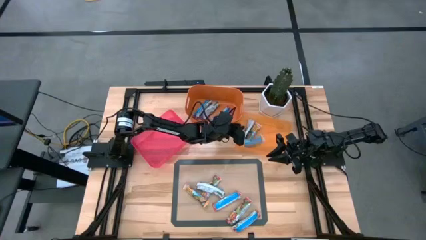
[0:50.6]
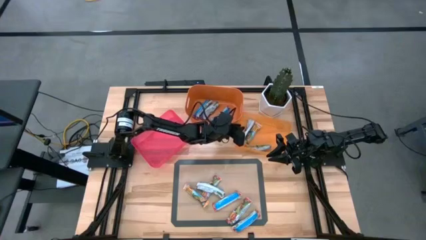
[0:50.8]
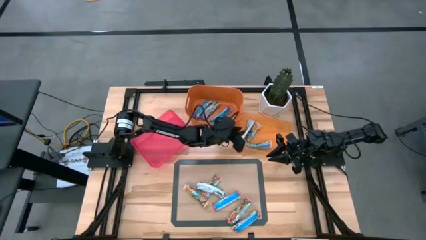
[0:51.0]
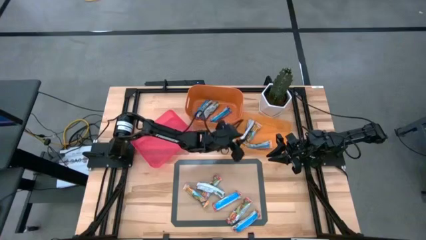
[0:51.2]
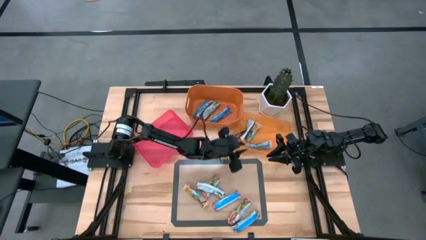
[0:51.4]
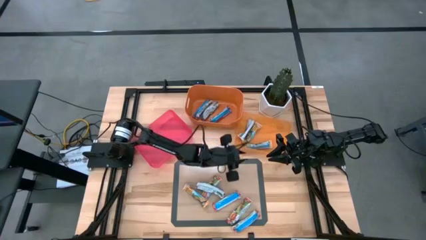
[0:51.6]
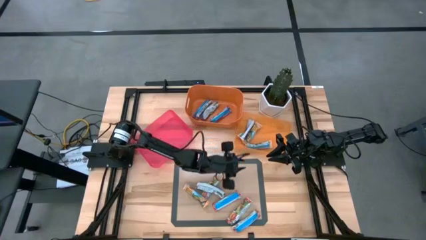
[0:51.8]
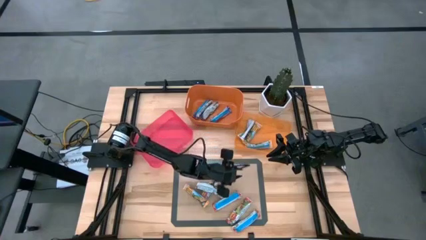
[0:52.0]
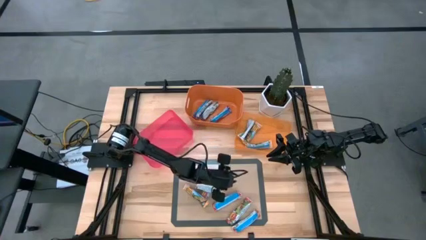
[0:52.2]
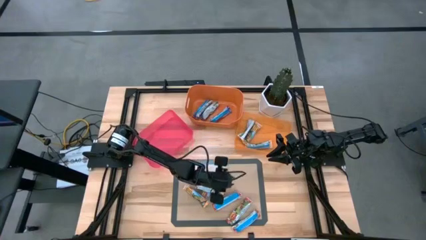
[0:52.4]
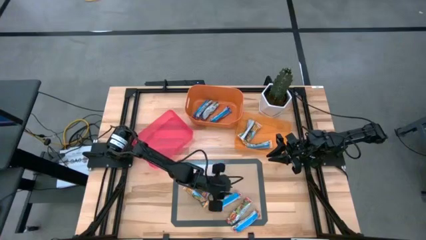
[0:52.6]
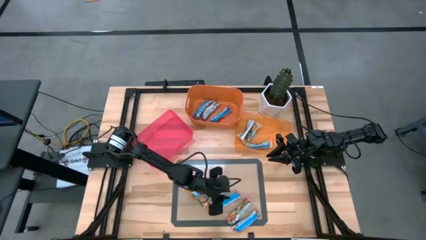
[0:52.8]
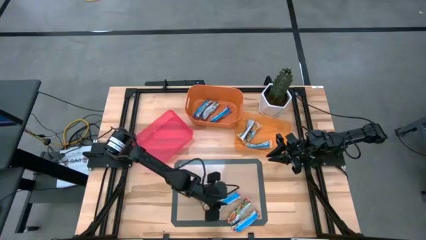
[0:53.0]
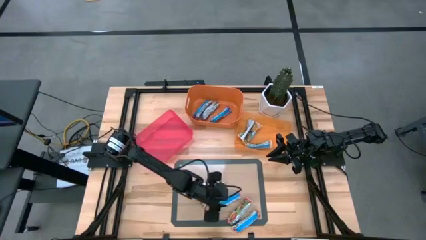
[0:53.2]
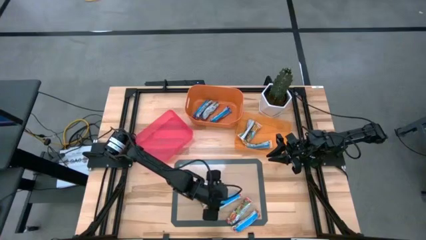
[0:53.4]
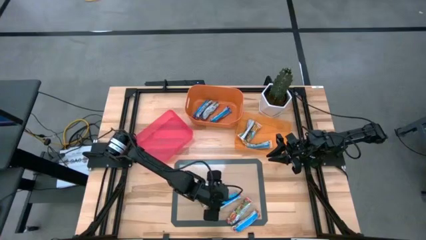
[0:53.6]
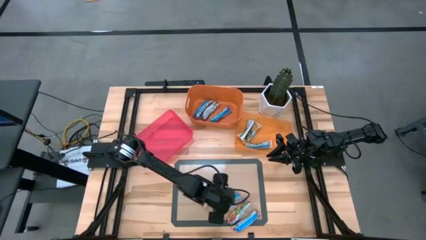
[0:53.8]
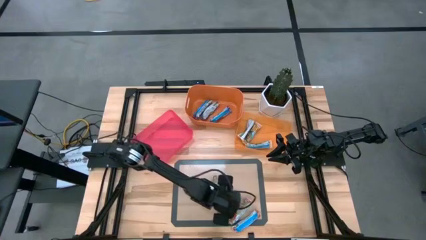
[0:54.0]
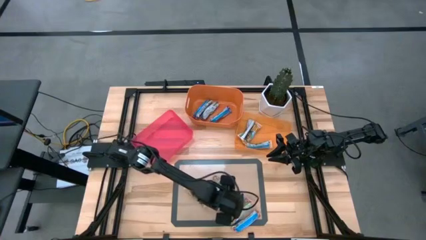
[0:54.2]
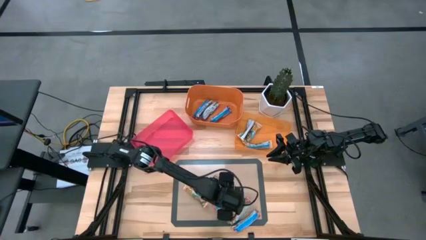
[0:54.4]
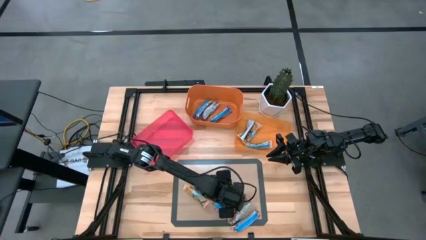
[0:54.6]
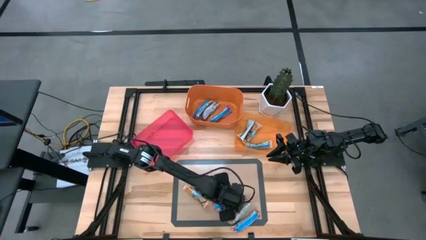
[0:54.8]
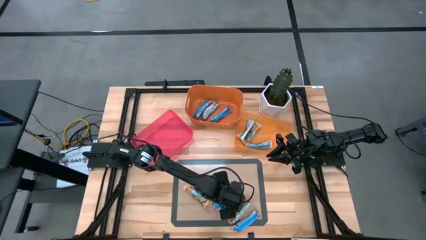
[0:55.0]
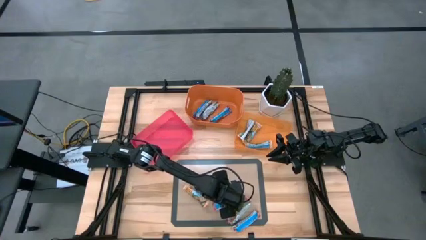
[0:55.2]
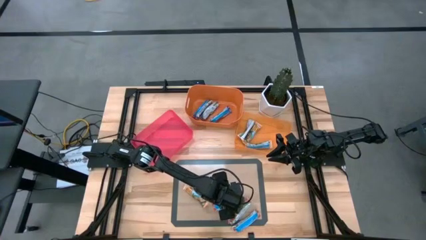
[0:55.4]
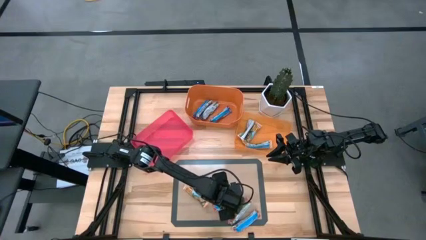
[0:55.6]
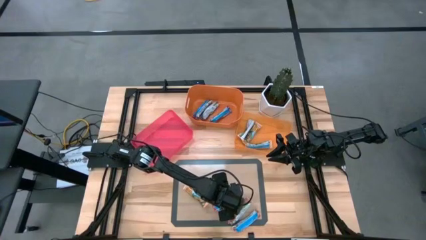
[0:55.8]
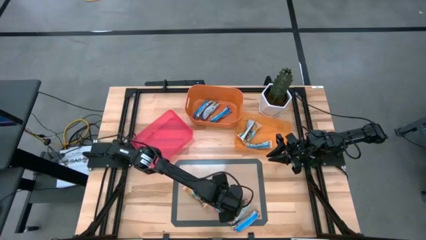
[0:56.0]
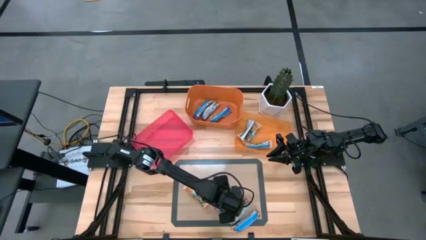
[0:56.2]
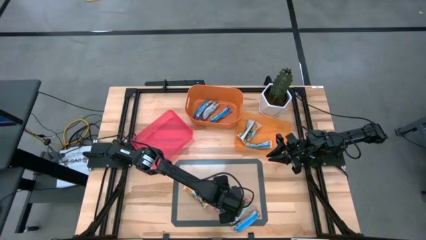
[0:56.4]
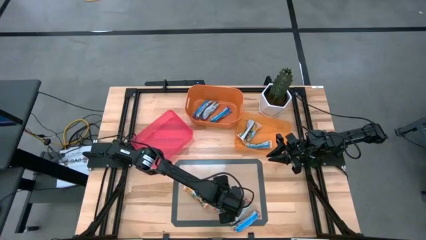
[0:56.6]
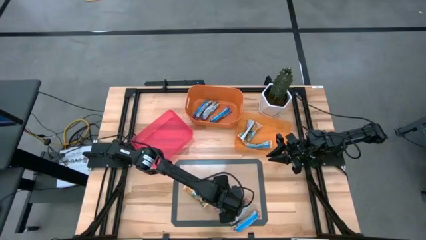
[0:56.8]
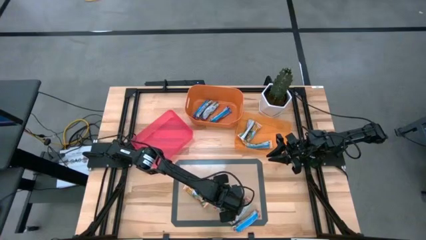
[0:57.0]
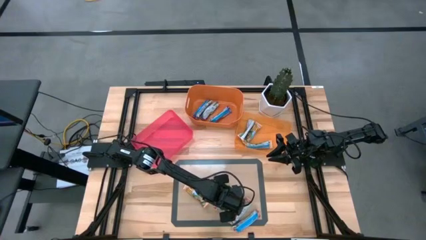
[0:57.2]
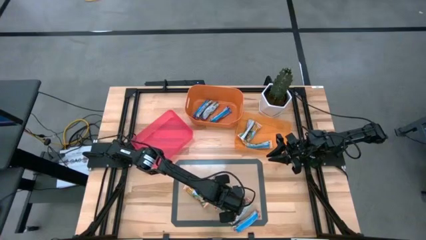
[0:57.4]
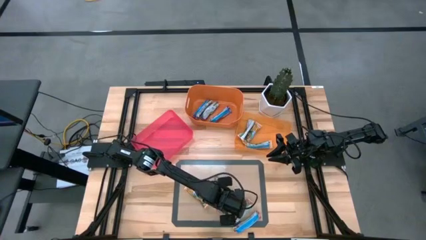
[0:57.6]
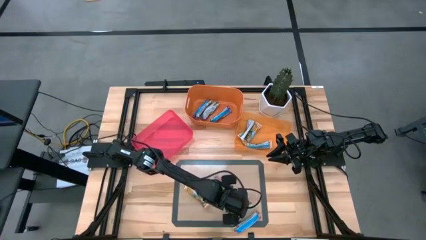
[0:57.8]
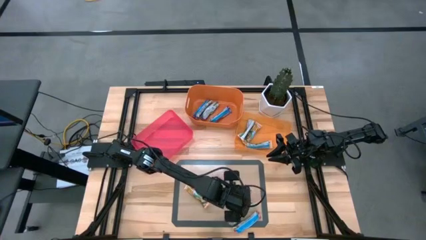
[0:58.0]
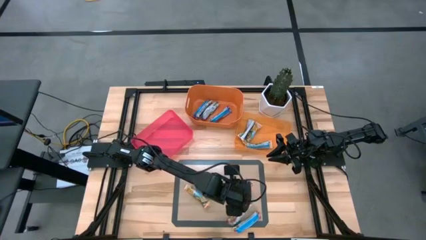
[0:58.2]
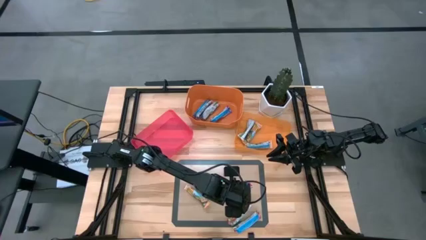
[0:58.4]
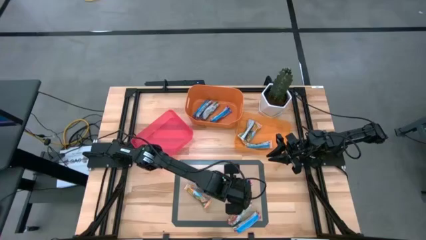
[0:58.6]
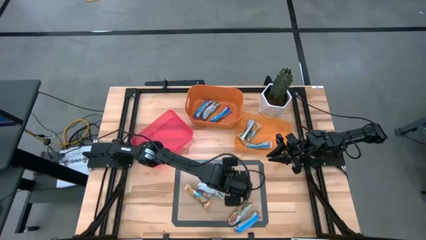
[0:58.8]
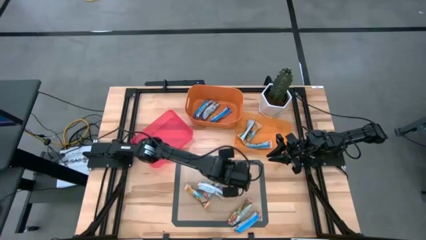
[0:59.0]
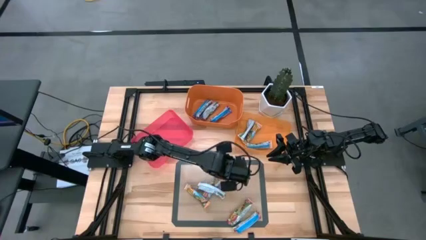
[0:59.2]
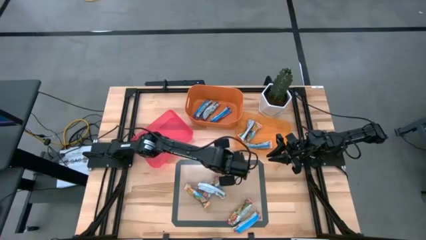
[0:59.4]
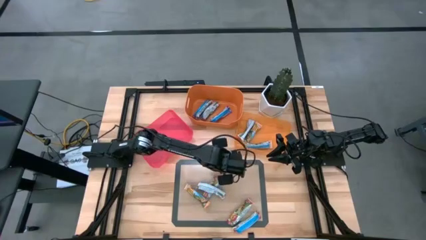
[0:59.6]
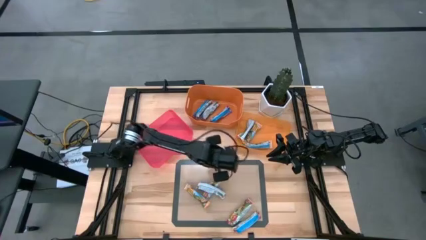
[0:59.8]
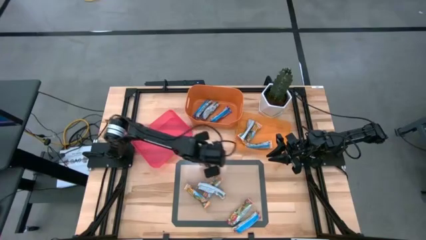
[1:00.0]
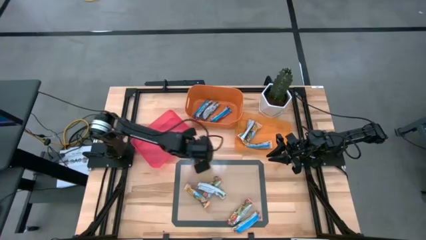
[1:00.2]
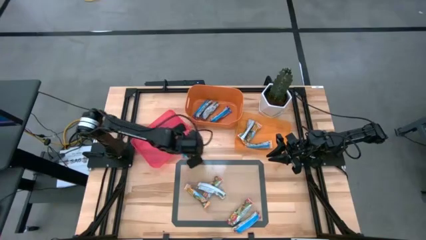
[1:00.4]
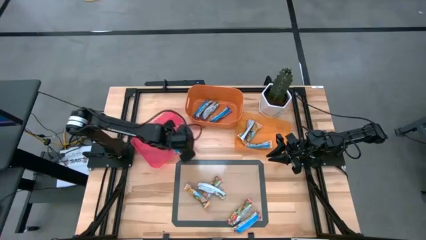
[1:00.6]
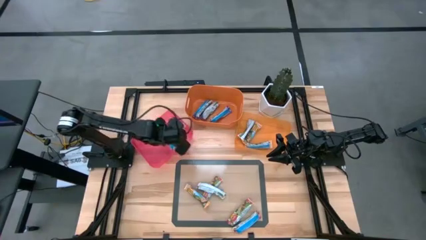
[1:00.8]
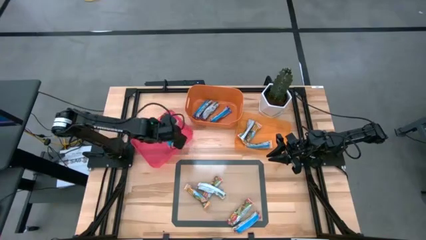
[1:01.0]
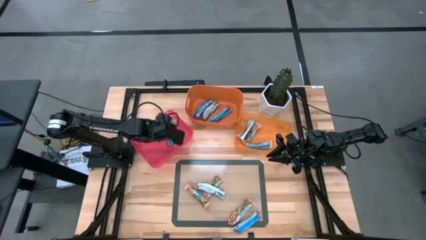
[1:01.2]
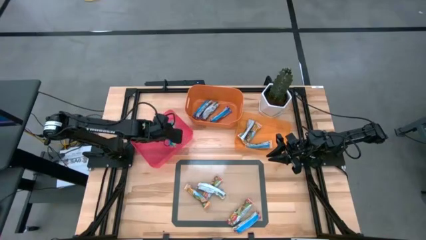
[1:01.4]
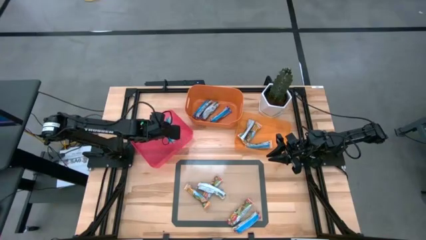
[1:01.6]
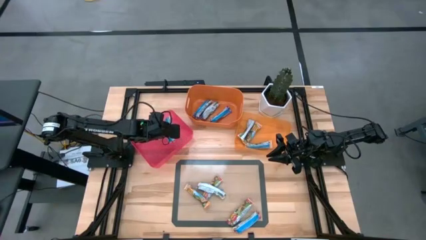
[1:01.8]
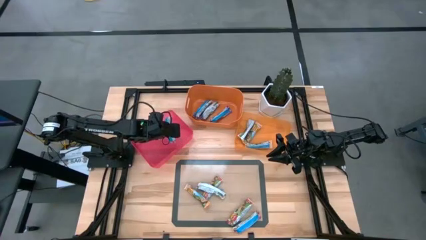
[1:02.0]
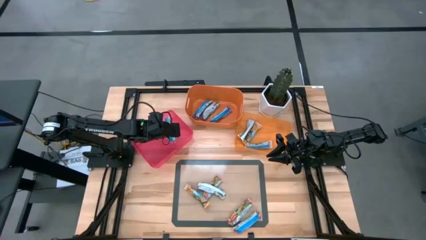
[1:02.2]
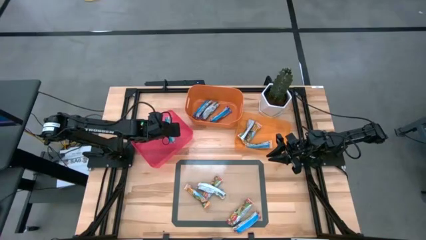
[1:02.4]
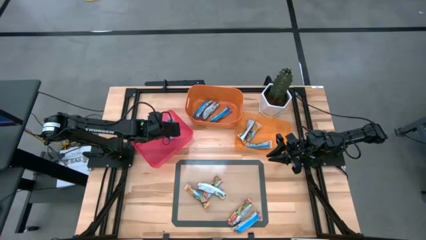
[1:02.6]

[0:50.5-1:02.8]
Task: Pick and place Granola Bars by type
Put the red granola bar into the red bin

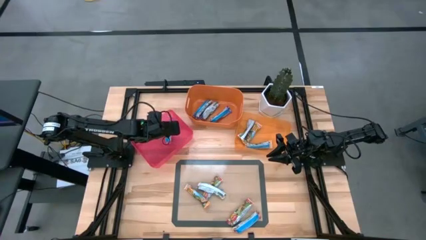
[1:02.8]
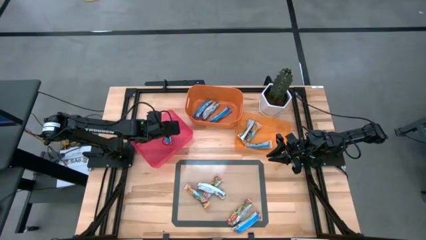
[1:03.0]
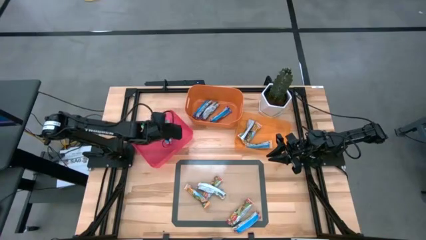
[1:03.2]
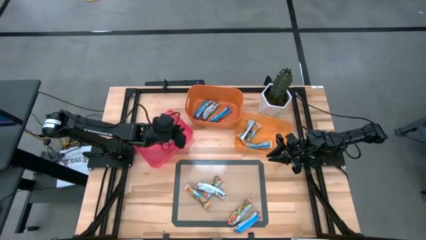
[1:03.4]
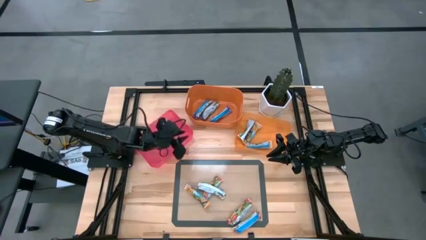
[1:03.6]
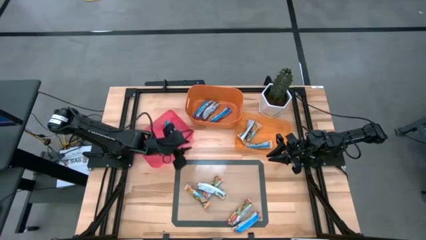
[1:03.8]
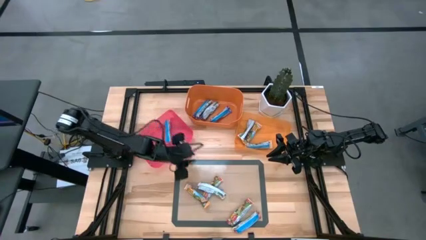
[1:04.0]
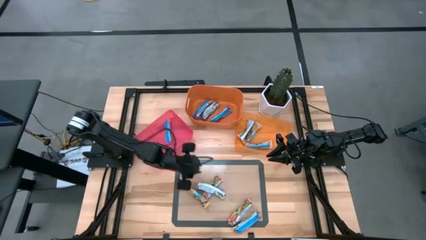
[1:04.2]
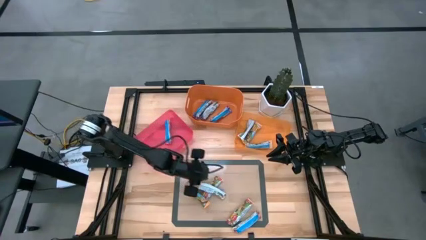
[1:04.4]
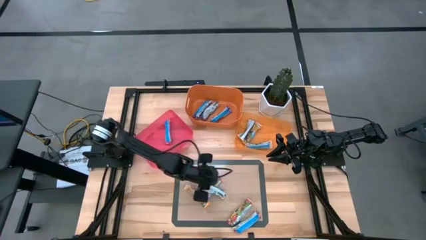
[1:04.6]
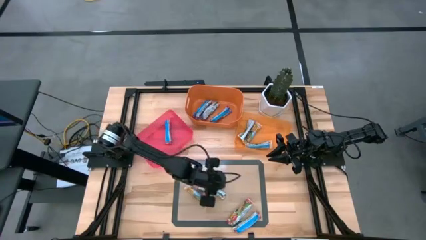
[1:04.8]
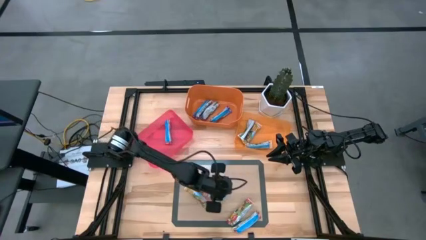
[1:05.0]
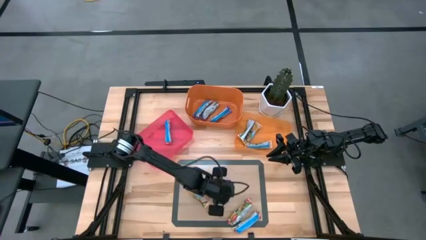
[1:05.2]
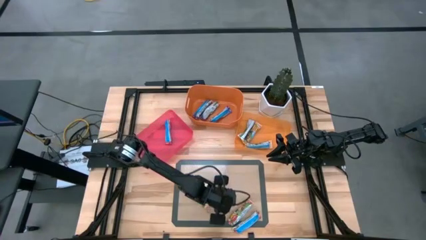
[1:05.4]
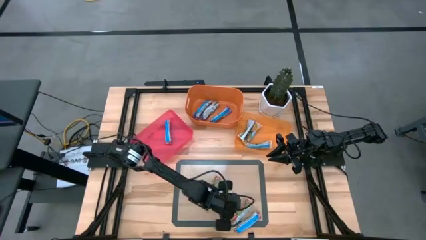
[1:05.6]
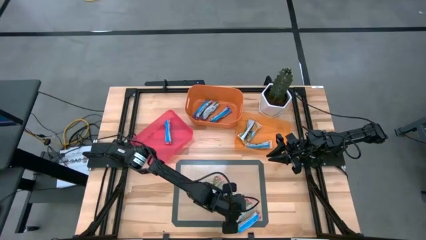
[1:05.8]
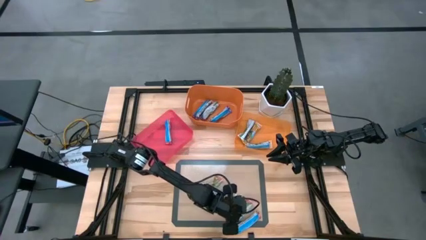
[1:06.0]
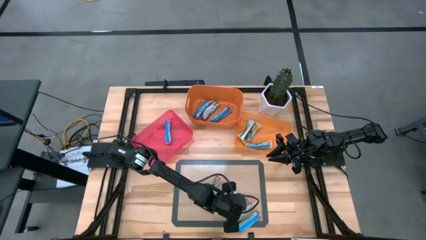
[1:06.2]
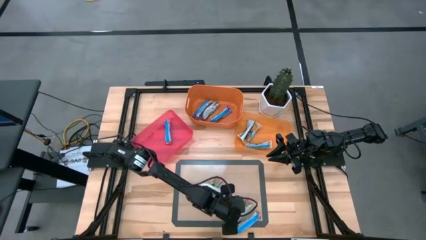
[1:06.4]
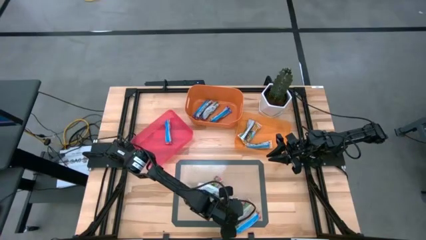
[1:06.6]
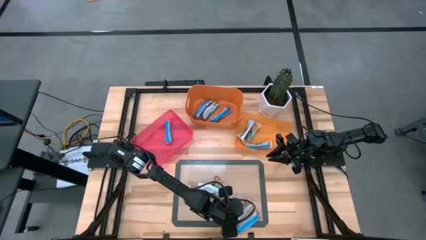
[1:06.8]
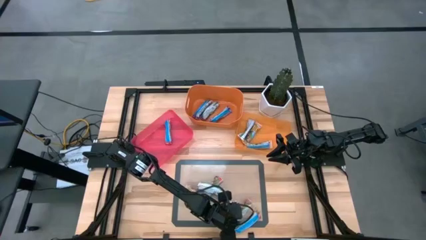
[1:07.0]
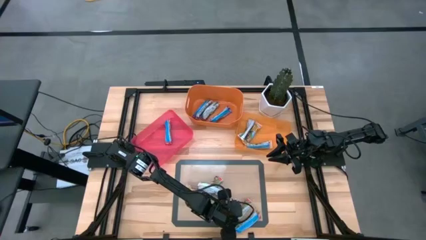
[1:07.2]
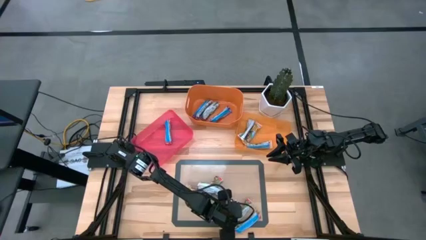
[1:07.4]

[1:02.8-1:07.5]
Put the middle red granola bar into the red bin
